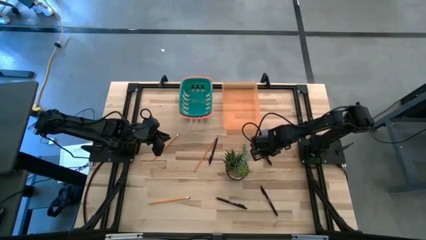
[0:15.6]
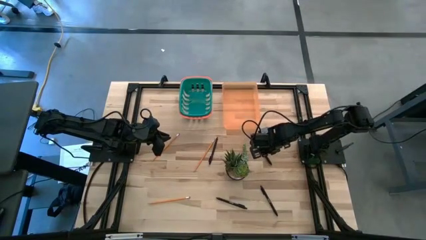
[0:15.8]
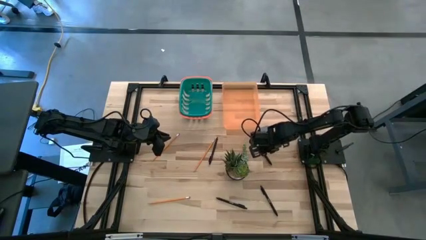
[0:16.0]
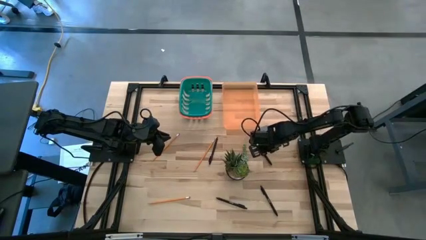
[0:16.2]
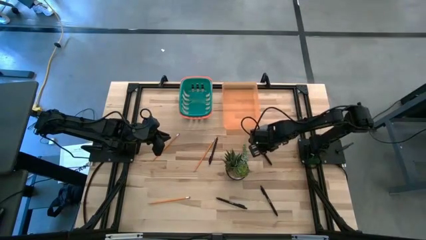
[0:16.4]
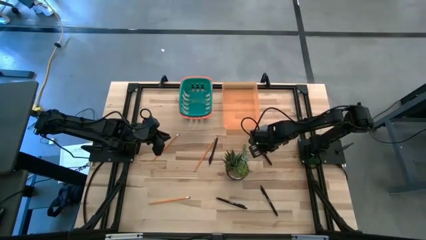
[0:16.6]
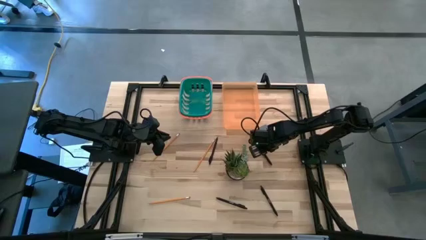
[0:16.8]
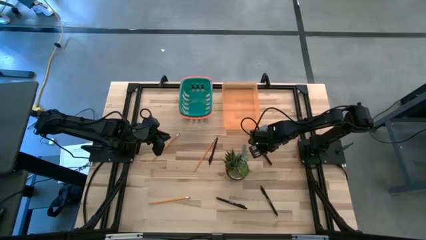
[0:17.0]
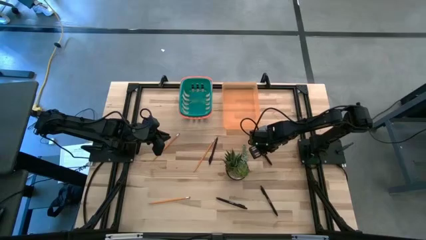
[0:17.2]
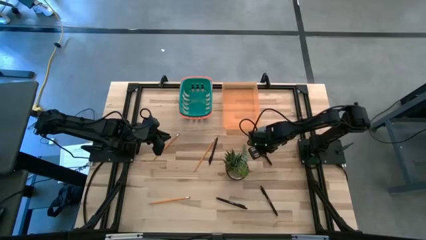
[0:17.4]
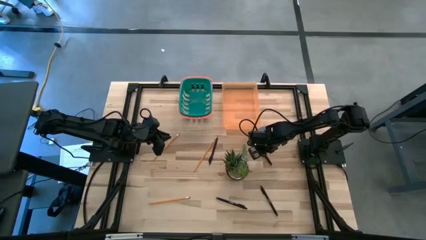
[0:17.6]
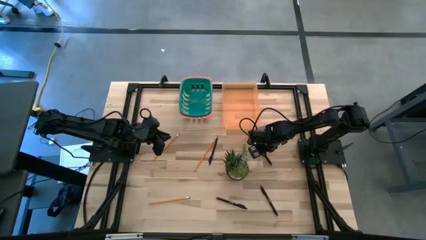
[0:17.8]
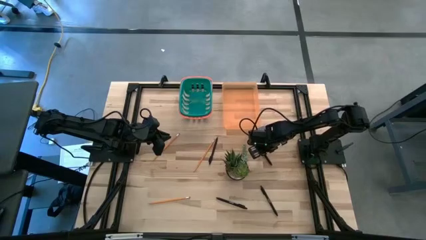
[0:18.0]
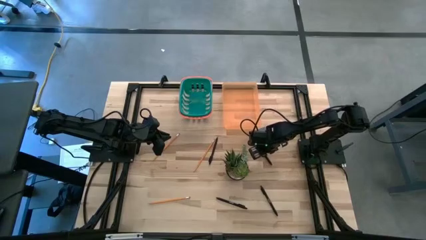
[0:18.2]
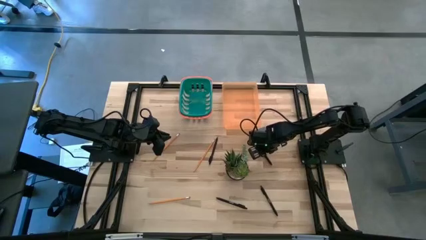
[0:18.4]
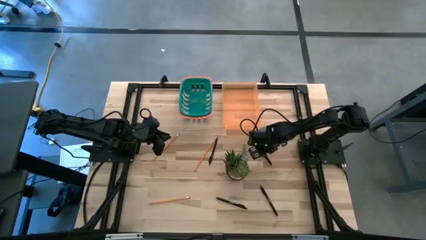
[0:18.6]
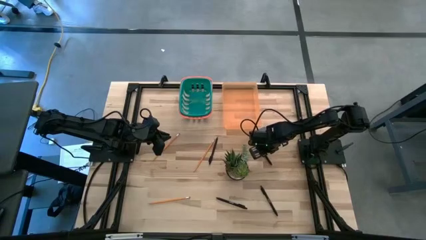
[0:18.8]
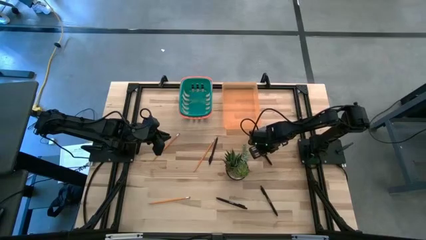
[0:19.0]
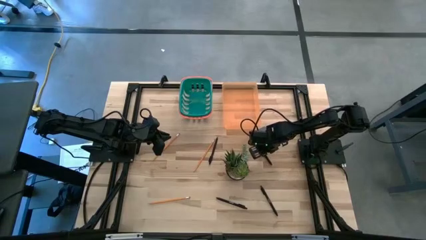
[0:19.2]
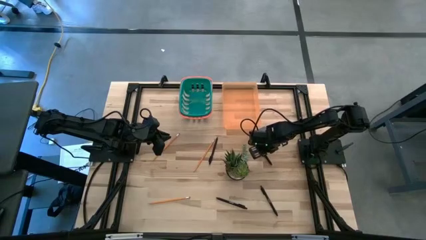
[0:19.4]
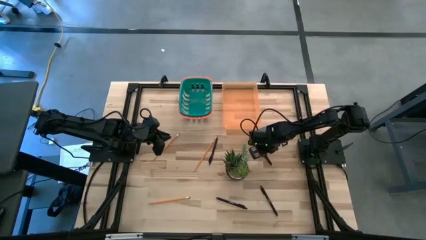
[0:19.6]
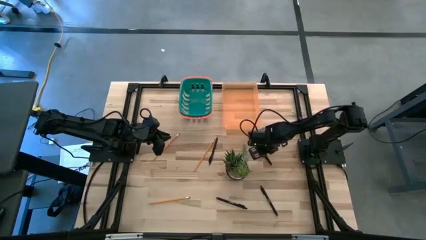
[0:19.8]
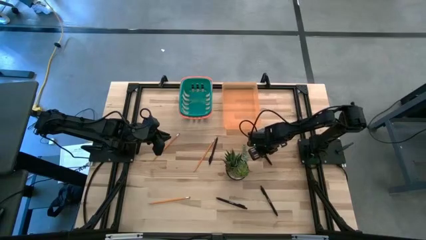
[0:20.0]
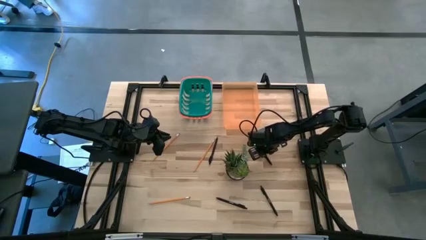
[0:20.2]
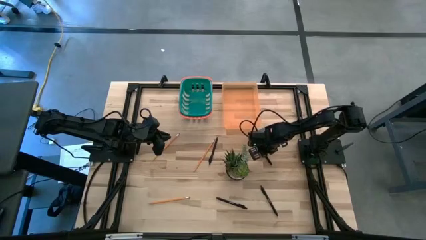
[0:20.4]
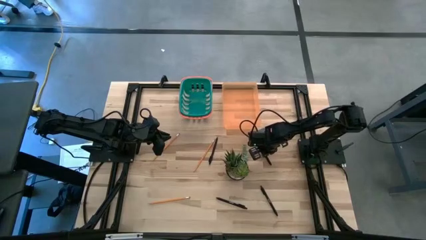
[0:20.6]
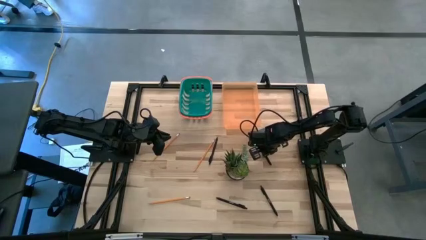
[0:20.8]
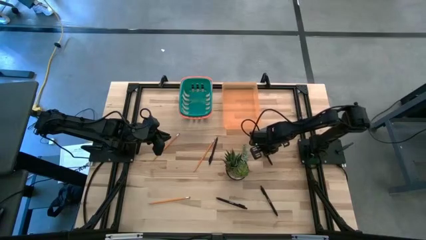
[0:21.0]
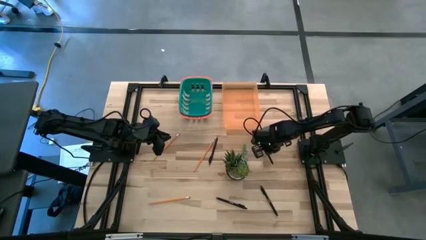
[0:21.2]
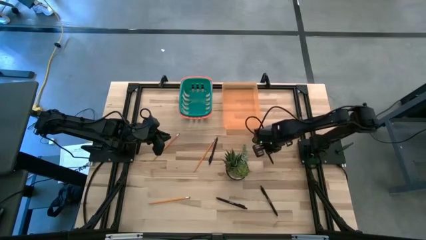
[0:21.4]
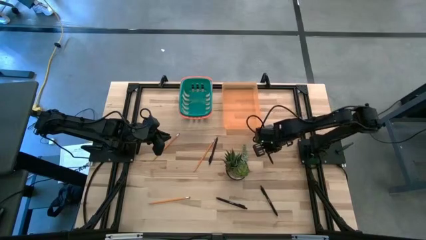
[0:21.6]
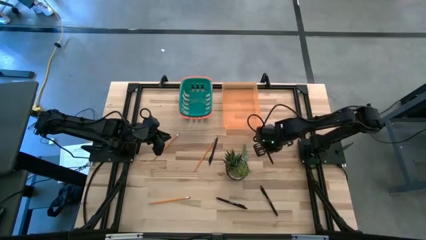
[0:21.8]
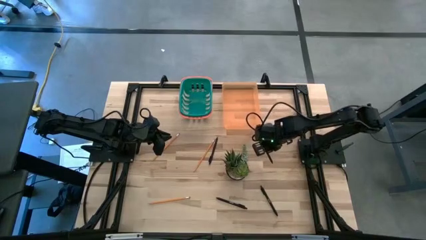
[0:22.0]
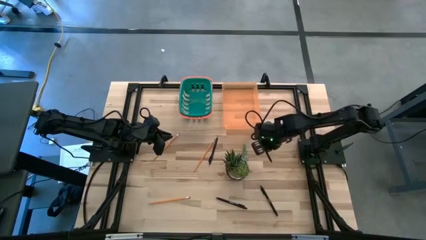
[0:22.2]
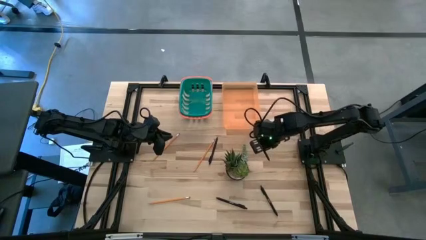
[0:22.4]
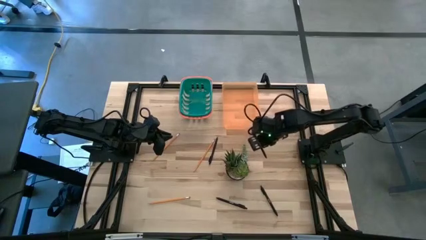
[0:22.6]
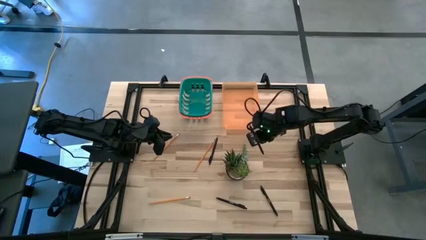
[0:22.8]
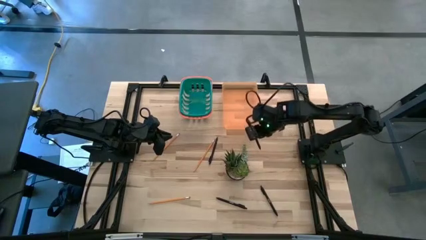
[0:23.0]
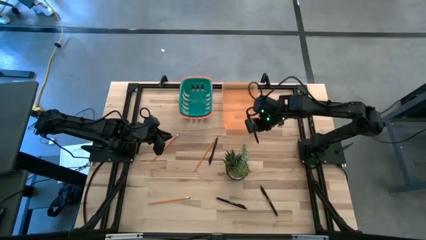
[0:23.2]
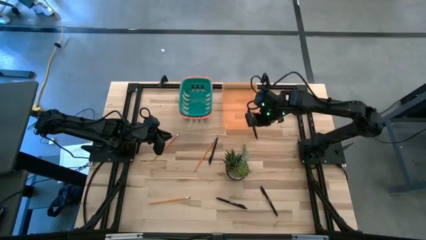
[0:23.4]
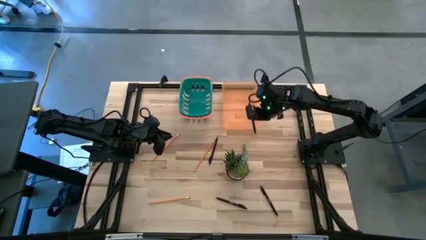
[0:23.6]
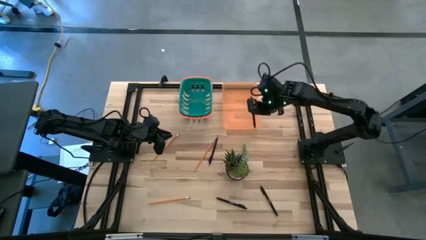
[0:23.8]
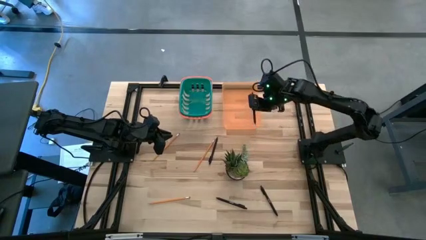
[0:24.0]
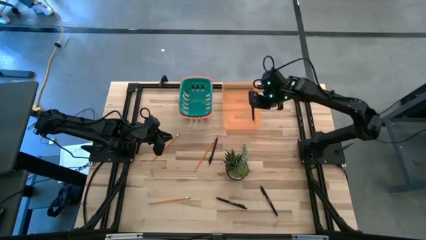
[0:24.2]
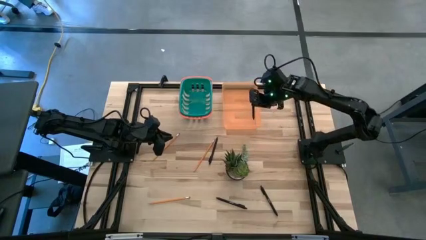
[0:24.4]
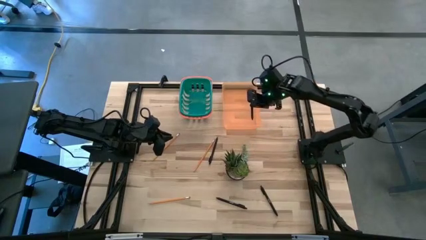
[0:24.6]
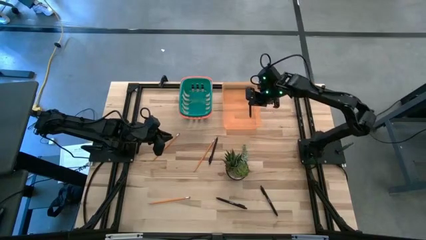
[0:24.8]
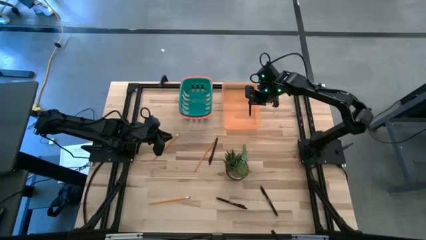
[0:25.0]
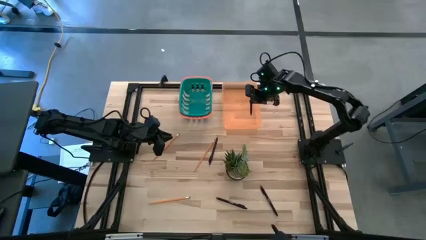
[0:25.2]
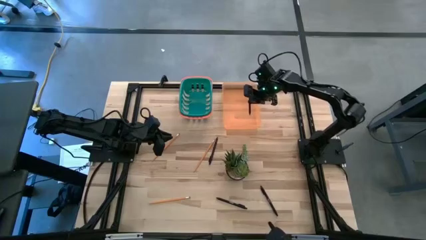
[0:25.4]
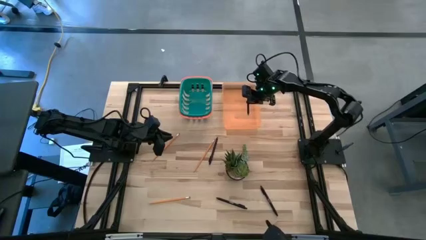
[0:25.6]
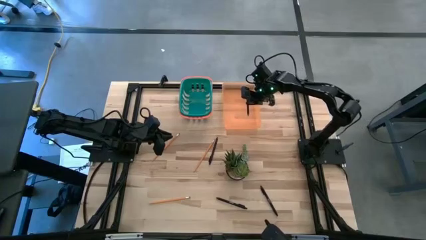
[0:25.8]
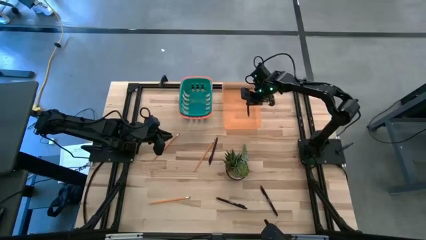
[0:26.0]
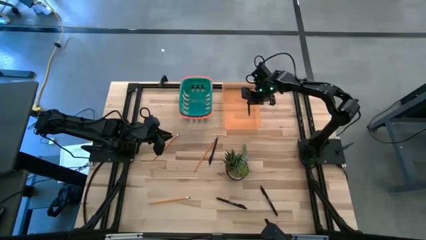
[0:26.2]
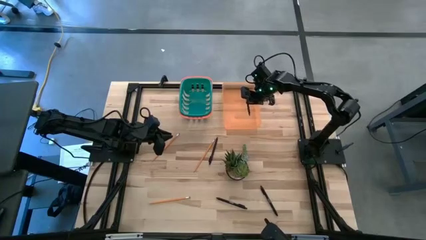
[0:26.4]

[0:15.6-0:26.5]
Task: Sort pens & pencils
Put the middle right black ballpoint pen into the orange bin
